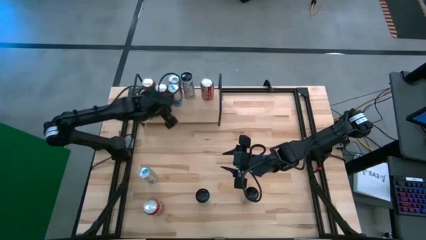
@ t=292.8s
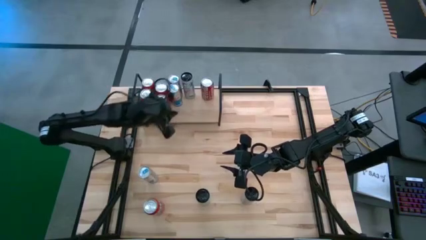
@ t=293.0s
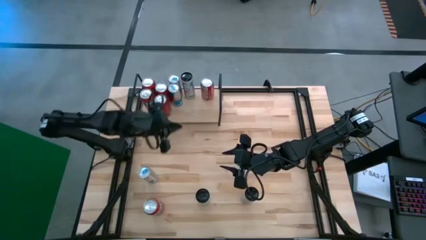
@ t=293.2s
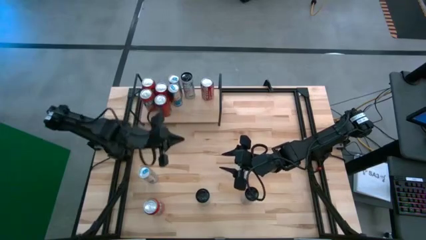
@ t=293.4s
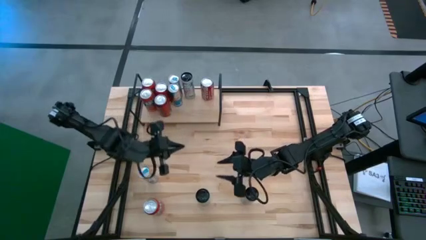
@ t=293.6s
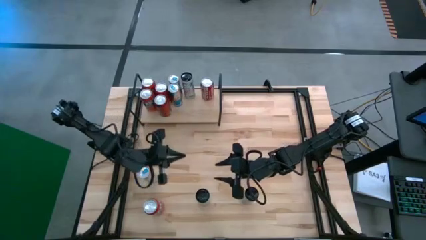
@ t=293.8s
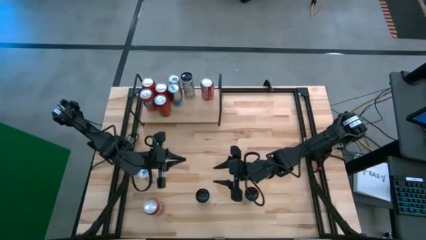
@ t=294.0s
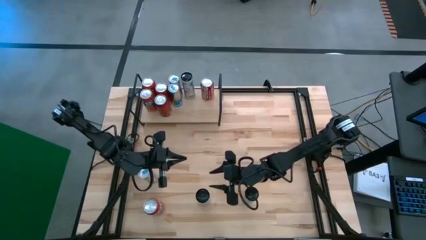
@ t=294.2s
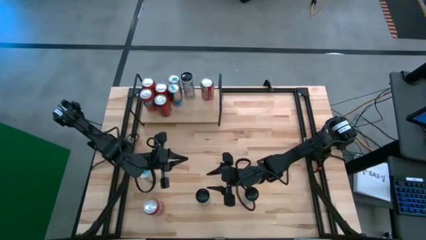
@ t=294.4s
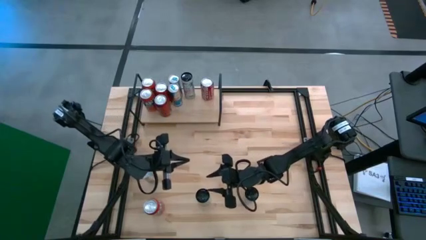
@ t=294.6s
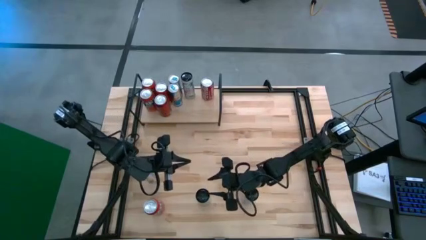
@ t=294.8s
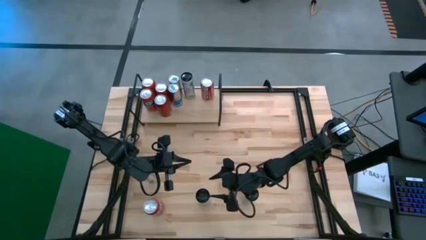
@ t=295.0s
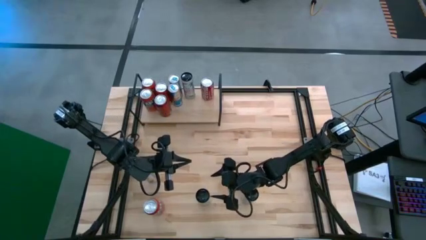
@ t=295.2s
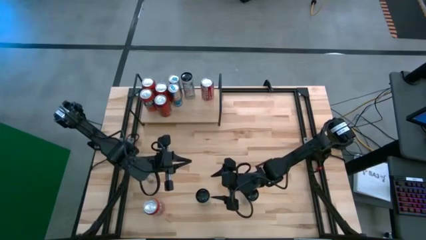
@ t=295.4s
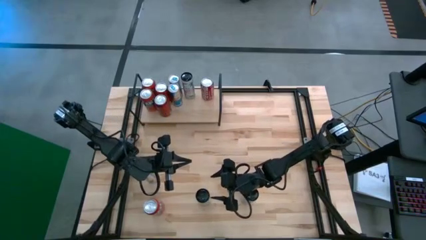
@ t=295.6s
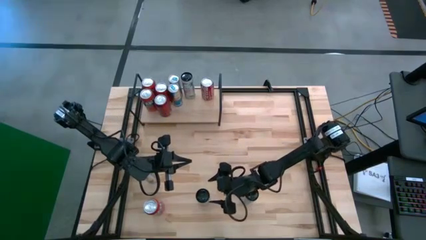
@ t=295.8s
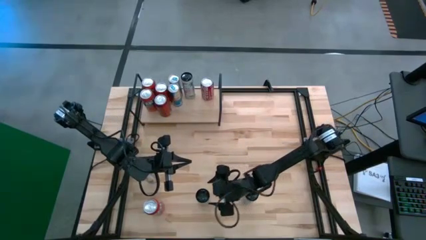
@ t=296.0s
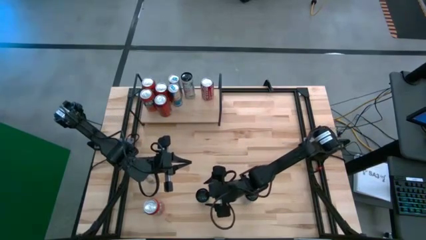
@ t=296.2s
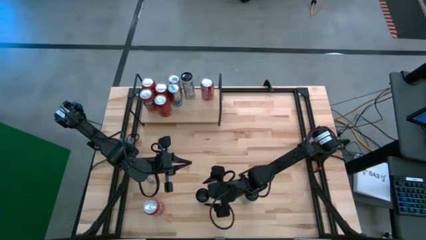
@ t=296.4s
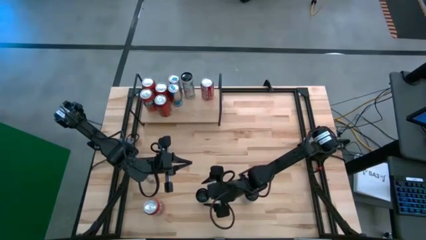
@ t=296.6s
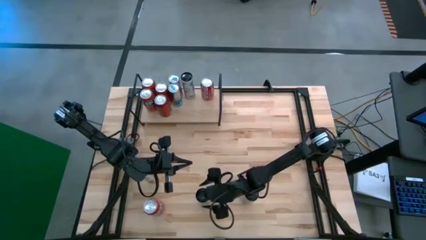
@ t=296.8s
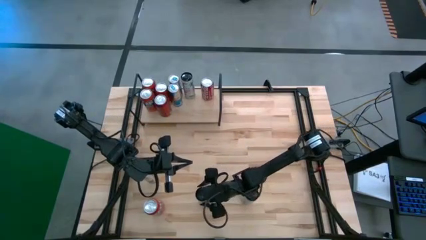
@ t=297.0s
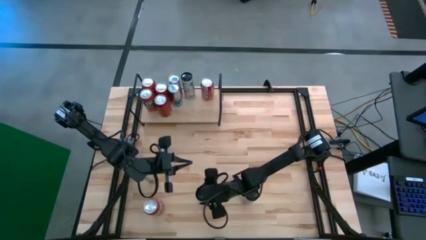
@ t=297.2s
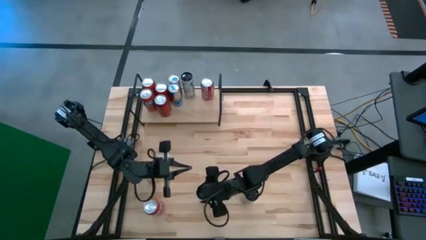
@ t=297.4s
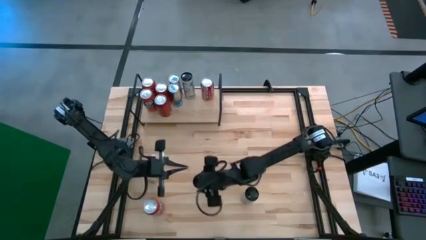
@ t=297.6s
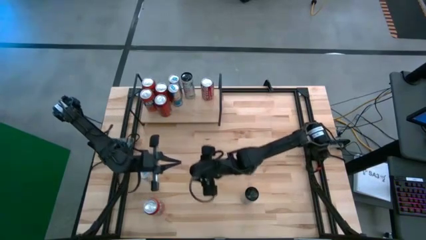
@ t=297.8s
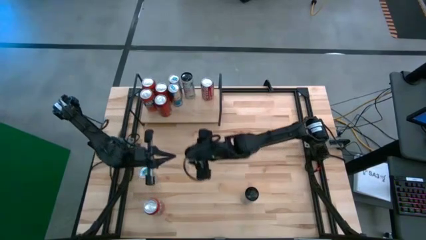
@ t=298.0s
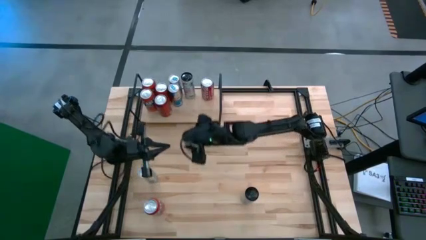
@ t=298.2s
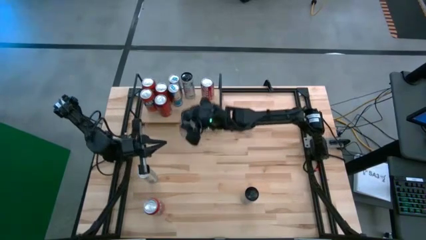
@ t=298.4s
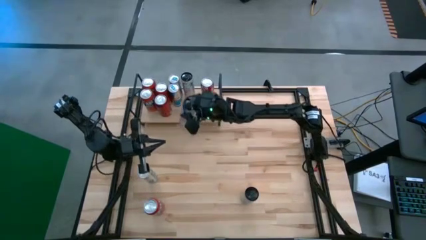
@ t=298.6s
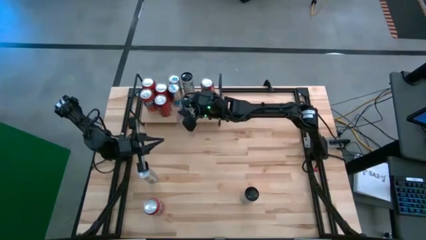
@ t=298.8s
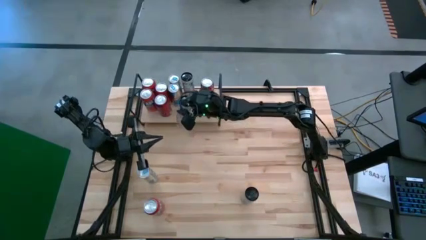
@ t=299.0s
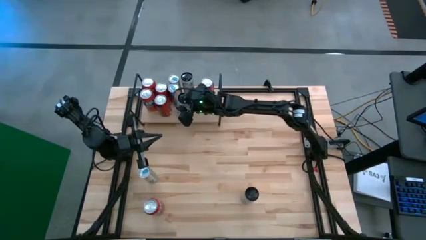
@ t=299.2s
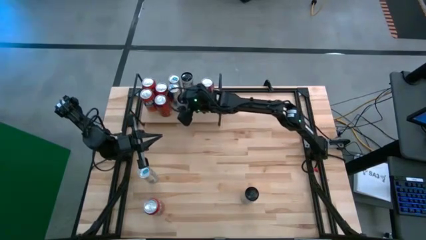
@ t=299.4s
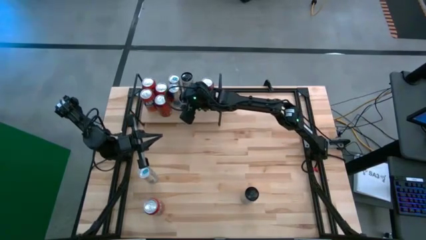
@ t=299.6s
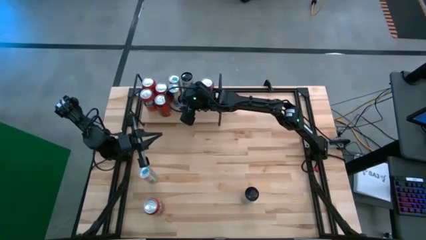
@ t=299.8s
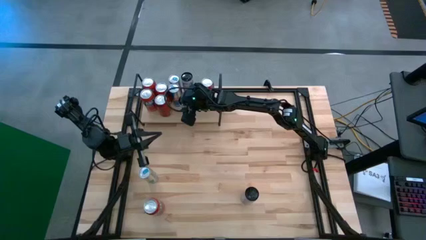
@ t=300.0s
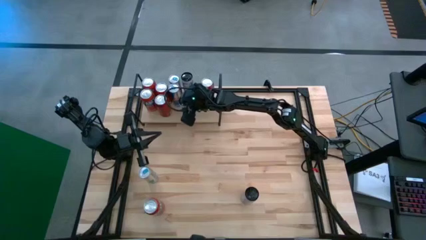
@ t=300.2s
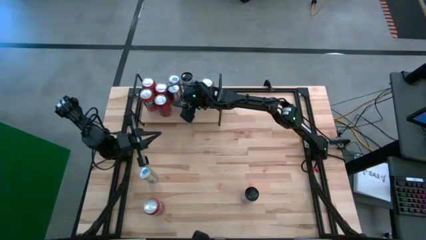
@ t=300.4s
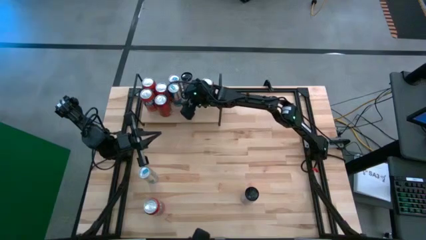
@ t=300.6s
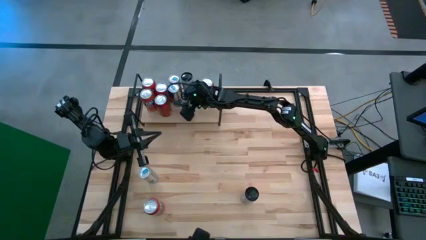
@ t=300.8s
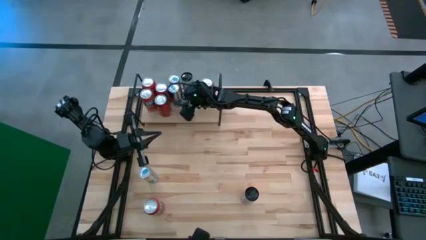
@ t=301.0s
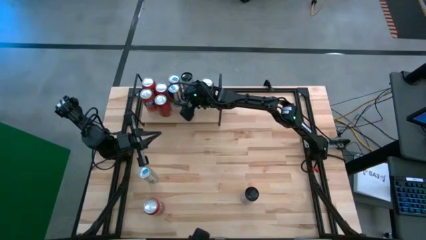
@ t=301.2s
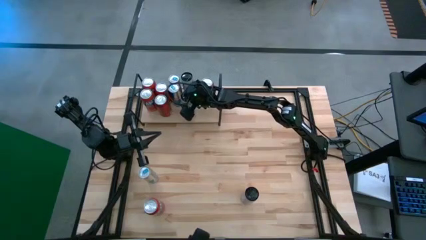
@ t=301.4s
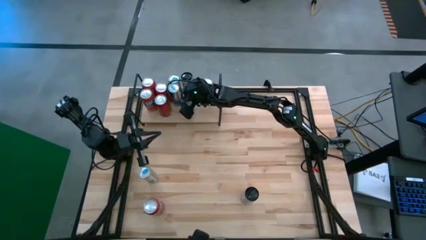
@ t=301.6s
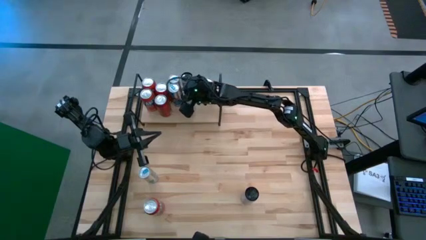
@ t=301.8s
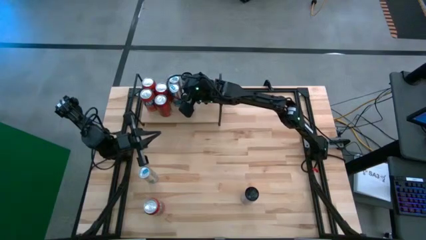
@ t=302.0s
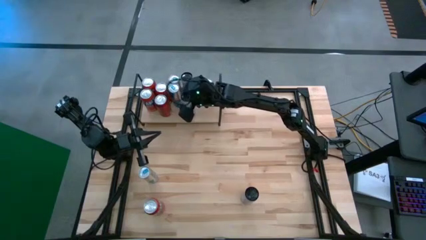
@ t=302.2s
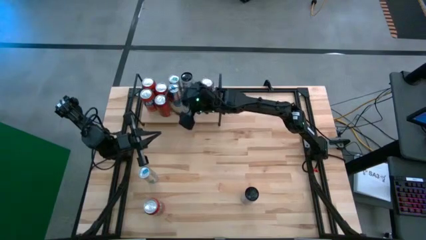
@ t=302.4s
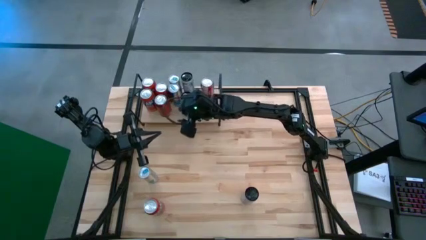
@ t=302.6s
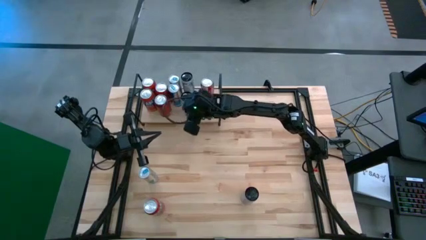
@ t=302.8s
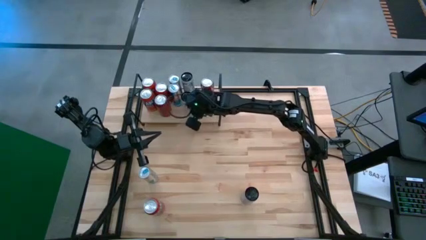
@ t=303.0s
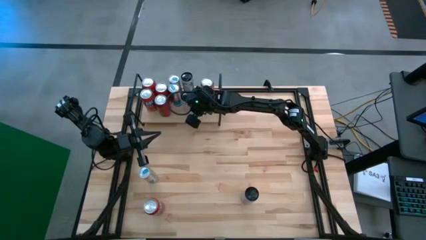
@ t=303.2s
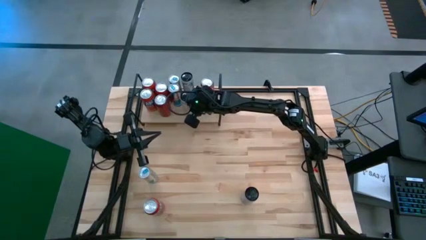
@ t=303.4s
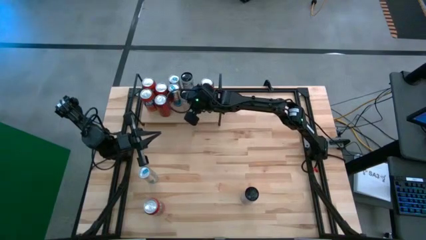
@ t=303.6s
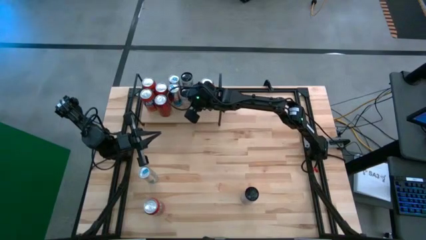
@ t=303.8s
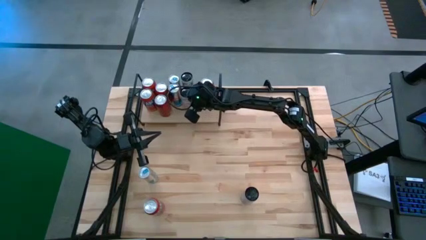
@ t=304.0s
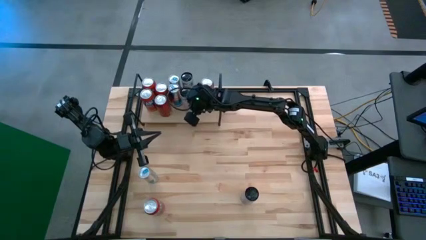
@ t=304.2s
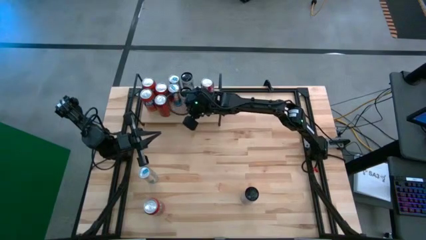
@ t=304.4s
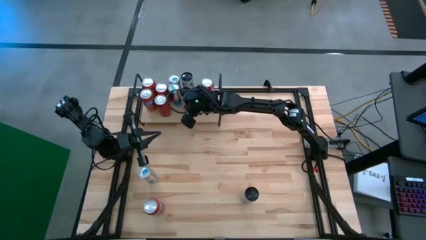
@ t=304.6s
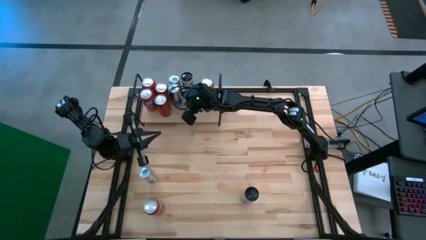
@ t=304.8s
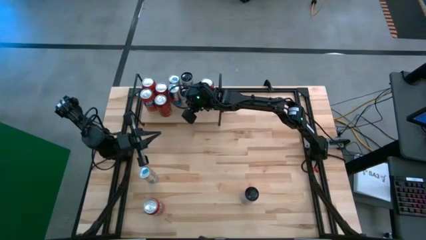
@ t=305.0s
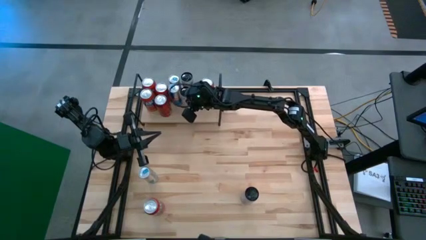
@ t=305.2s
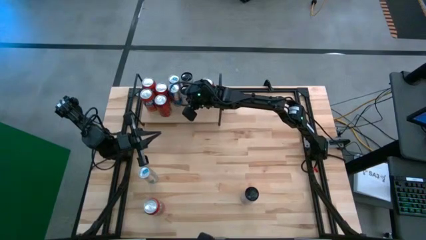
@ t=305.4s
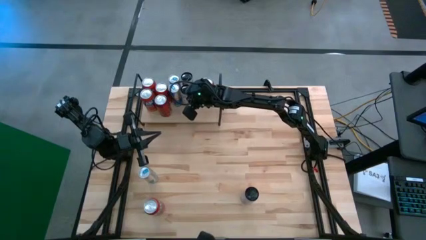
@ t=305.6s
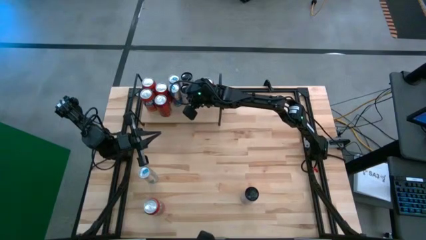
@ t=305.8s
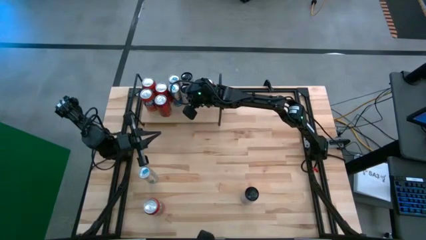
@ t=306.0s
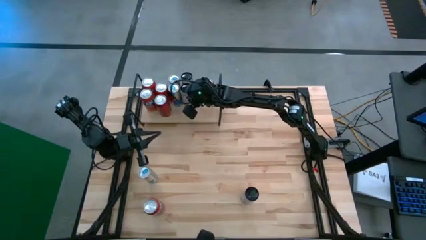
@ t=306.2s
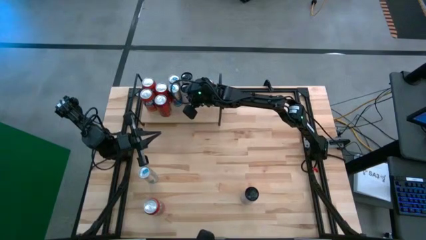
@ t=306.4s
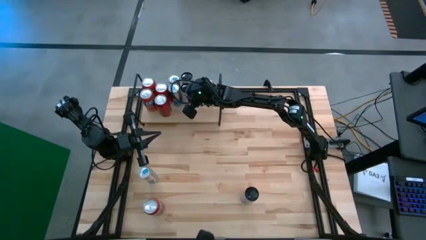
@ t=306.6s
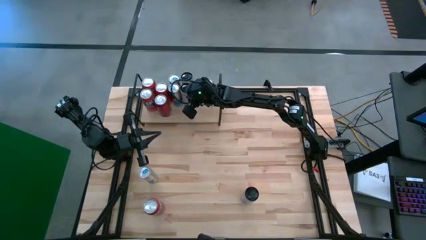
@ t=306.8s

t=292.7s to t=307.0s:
Task: Place canned beverage on shelf
Put the left white pink soda can on the shelf aligned with the other white pink soda can
